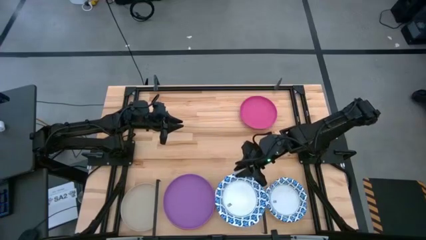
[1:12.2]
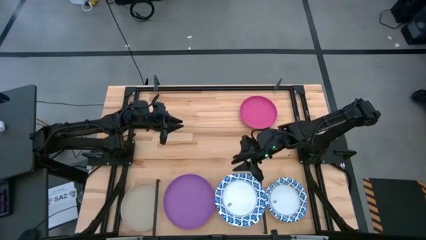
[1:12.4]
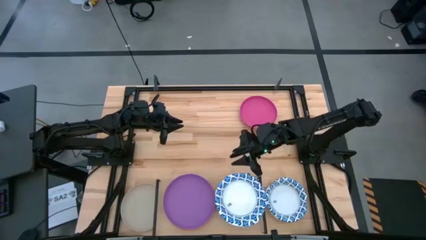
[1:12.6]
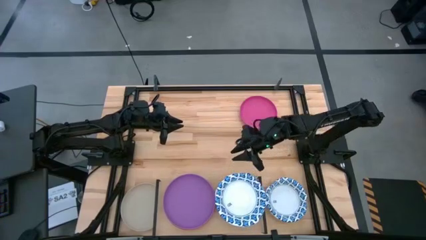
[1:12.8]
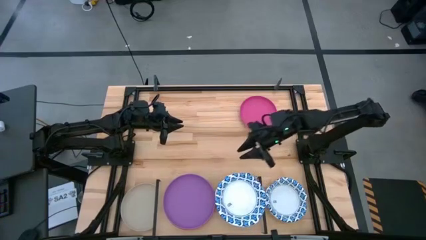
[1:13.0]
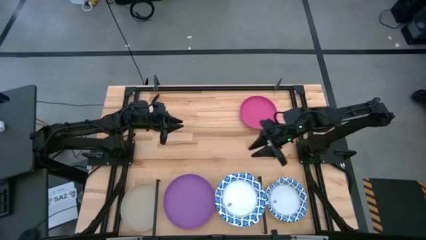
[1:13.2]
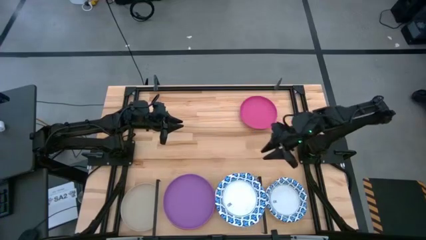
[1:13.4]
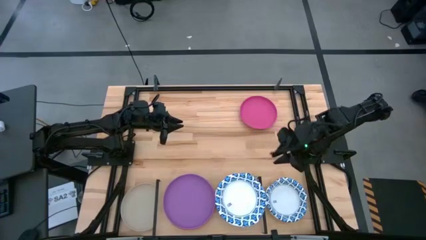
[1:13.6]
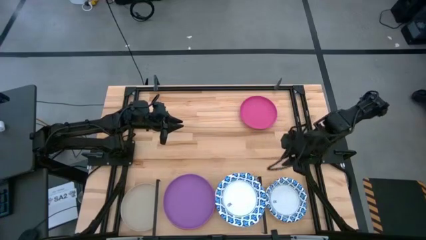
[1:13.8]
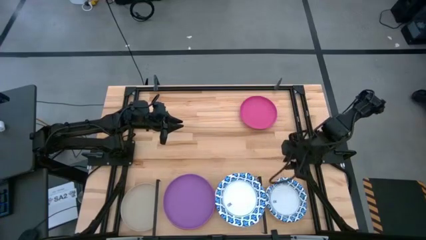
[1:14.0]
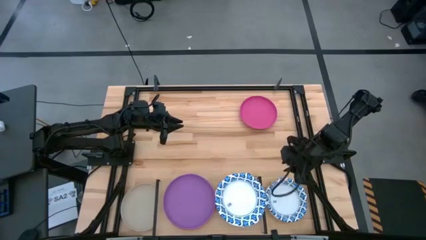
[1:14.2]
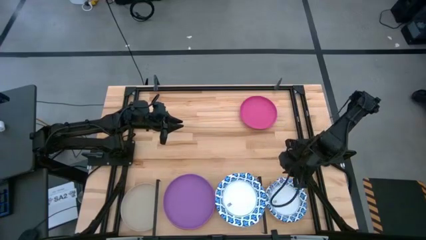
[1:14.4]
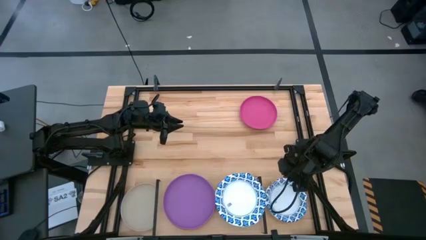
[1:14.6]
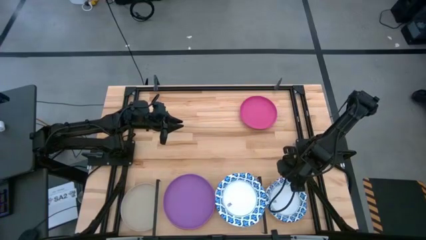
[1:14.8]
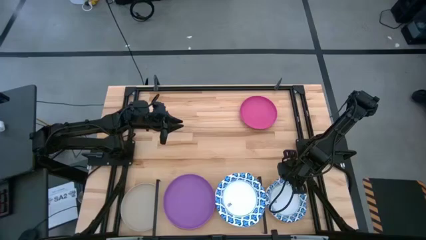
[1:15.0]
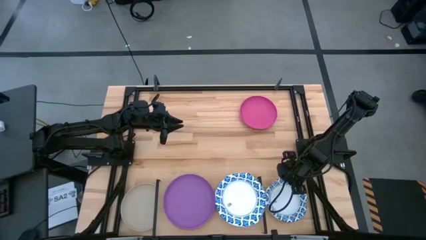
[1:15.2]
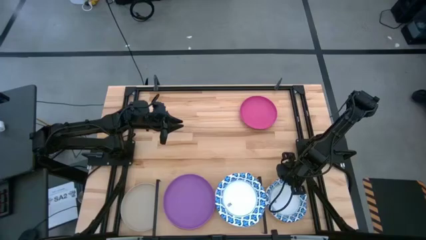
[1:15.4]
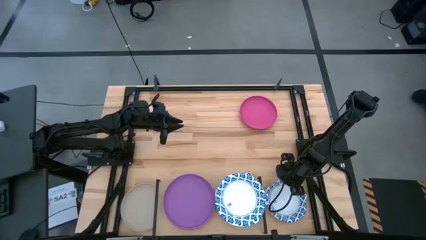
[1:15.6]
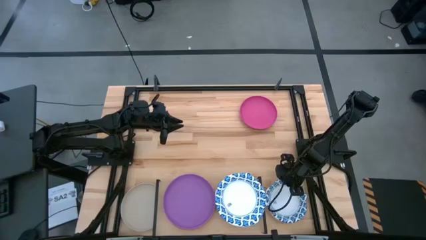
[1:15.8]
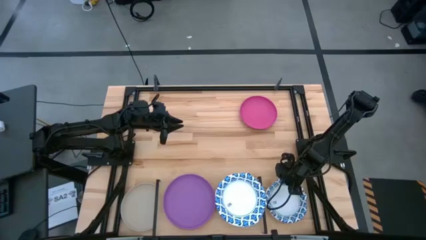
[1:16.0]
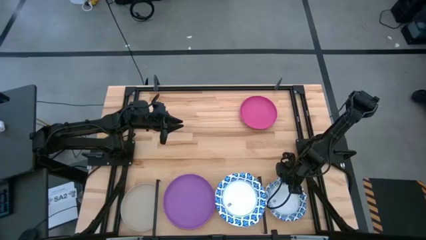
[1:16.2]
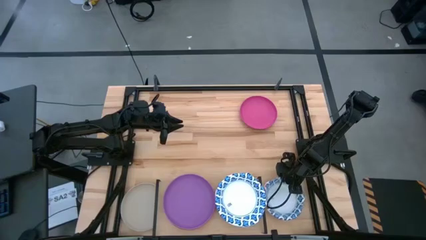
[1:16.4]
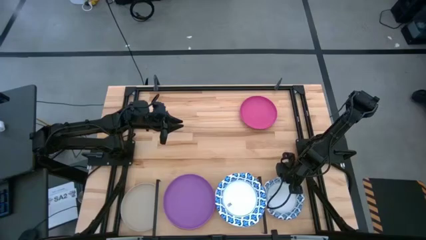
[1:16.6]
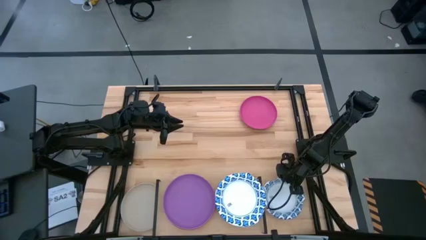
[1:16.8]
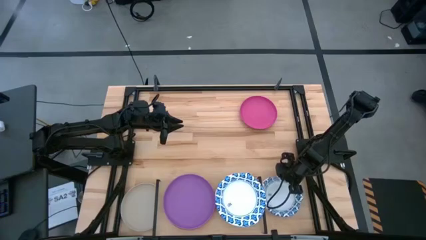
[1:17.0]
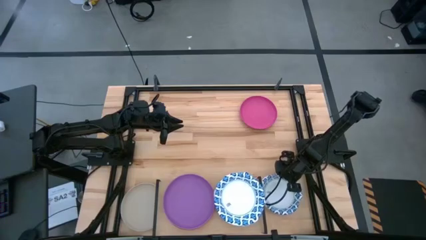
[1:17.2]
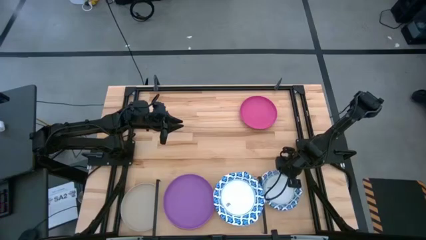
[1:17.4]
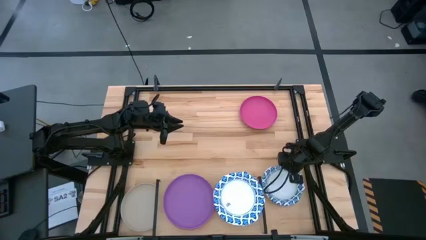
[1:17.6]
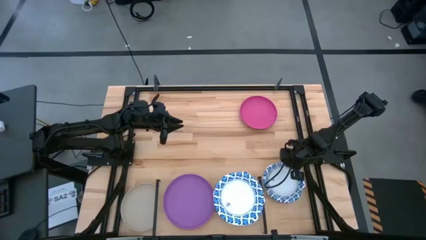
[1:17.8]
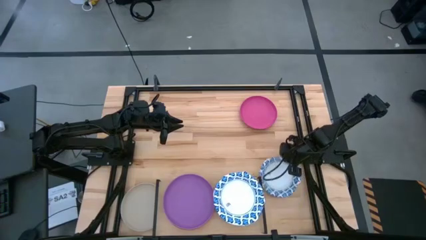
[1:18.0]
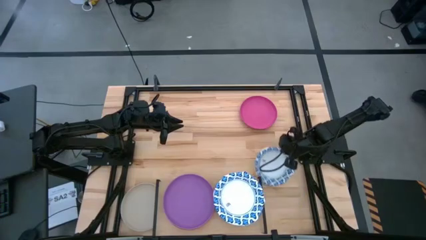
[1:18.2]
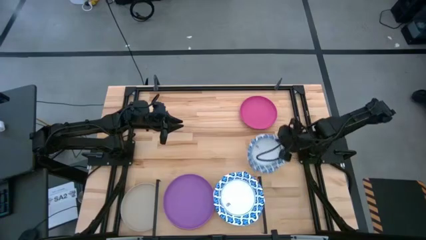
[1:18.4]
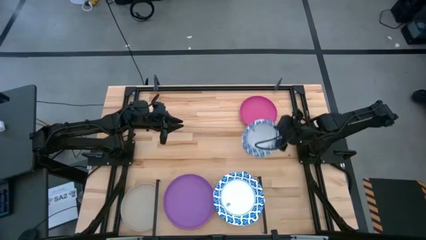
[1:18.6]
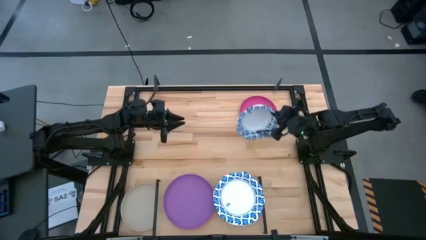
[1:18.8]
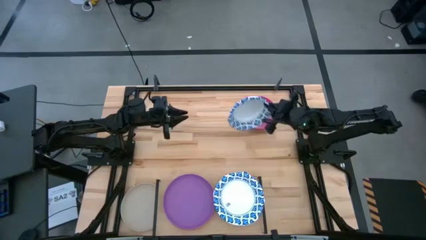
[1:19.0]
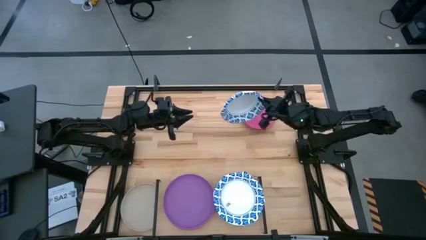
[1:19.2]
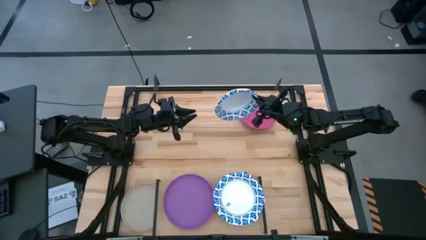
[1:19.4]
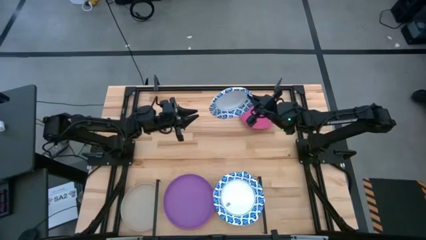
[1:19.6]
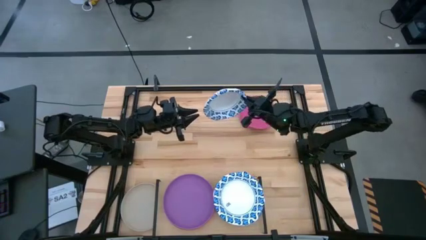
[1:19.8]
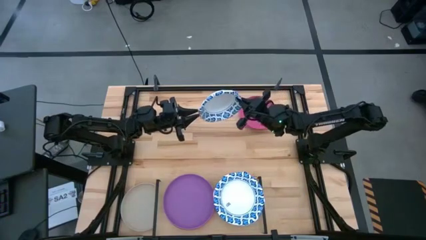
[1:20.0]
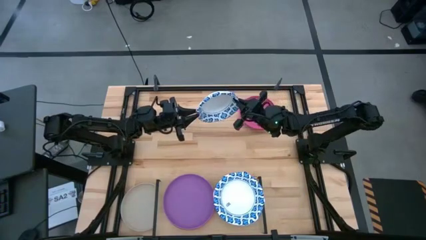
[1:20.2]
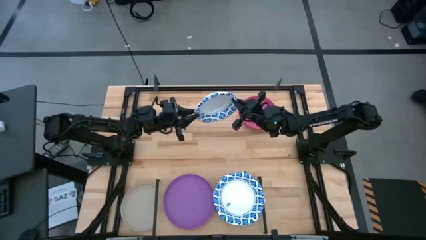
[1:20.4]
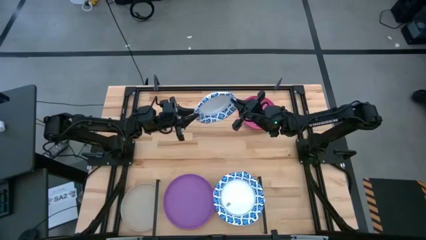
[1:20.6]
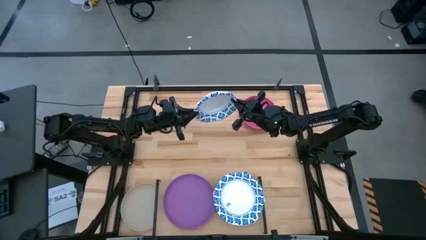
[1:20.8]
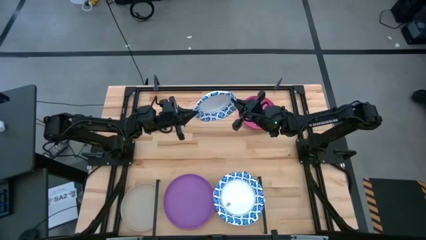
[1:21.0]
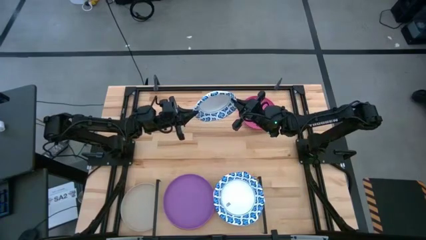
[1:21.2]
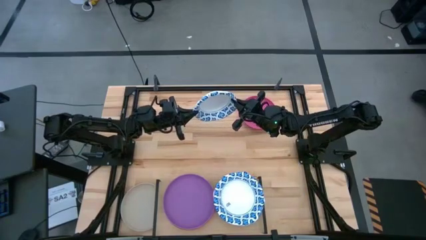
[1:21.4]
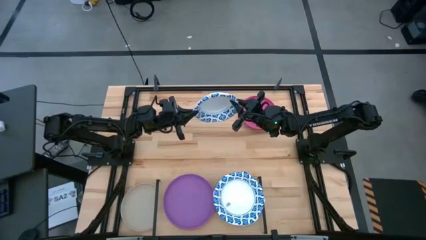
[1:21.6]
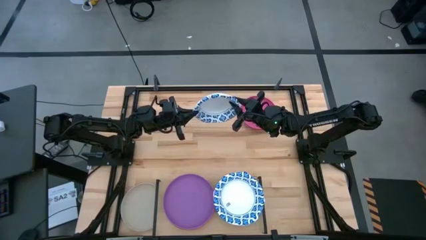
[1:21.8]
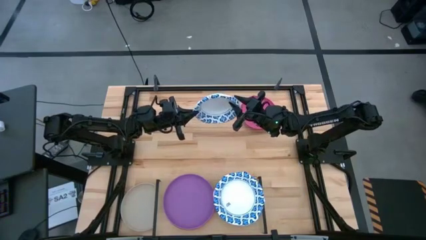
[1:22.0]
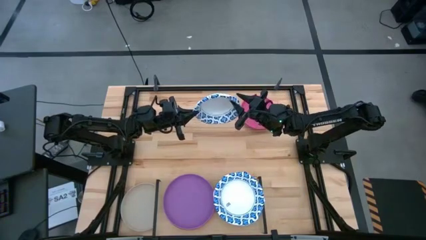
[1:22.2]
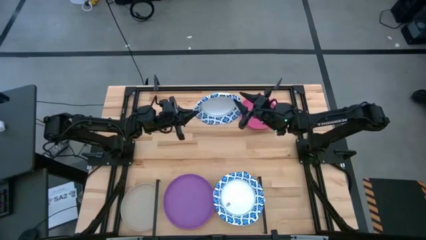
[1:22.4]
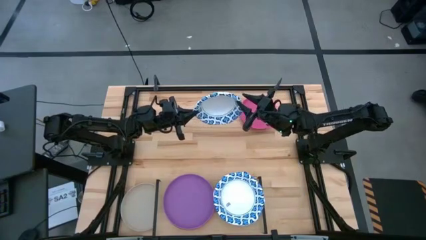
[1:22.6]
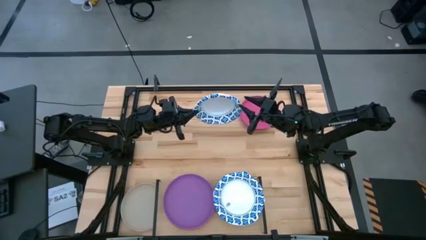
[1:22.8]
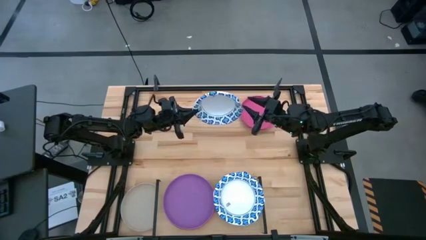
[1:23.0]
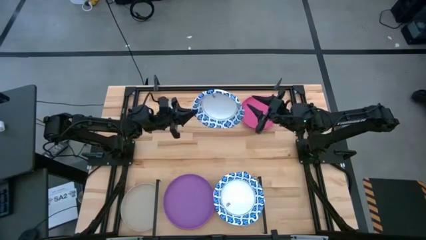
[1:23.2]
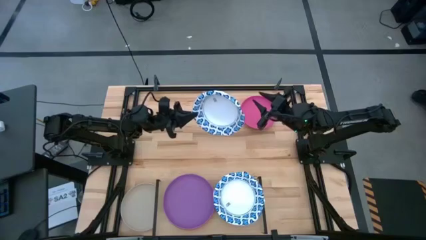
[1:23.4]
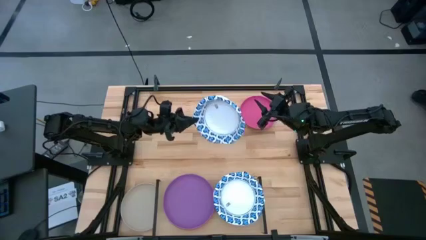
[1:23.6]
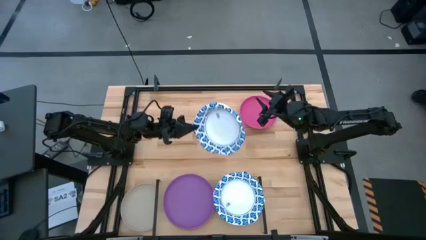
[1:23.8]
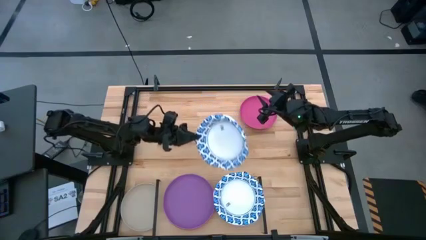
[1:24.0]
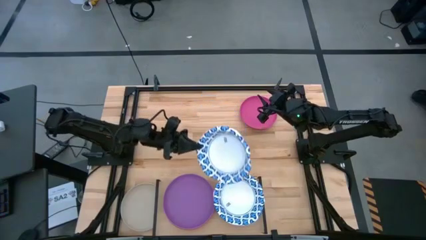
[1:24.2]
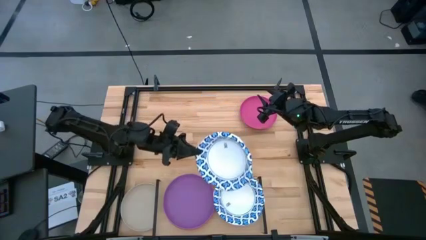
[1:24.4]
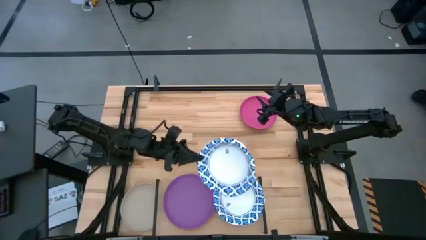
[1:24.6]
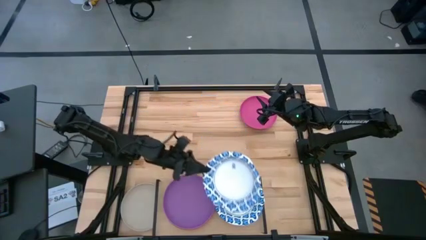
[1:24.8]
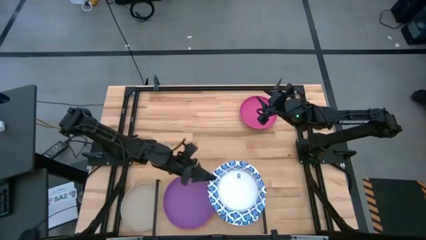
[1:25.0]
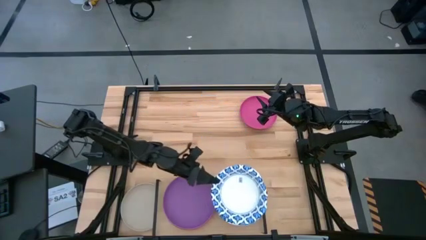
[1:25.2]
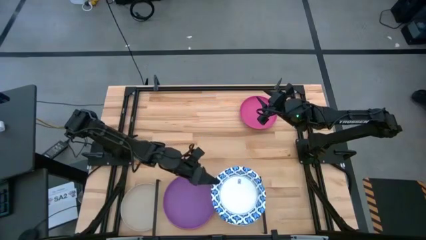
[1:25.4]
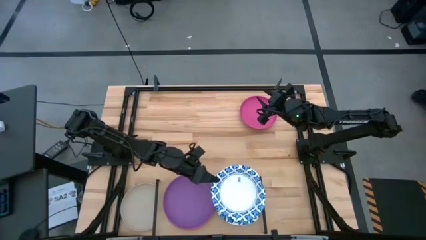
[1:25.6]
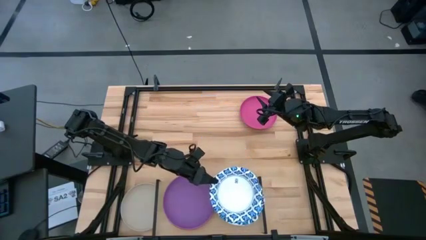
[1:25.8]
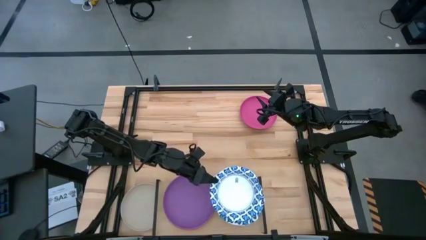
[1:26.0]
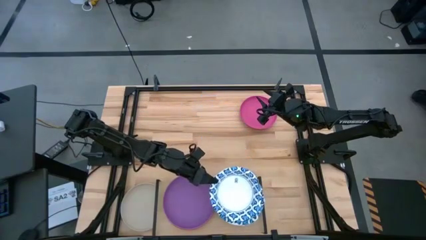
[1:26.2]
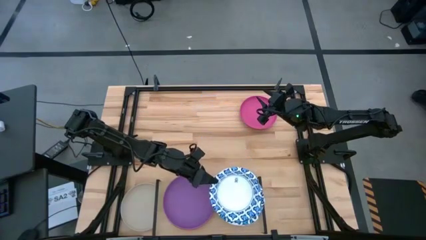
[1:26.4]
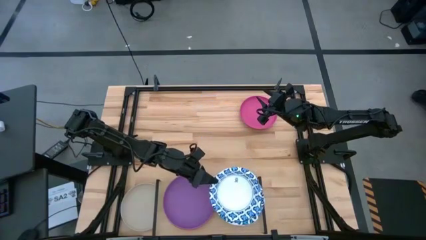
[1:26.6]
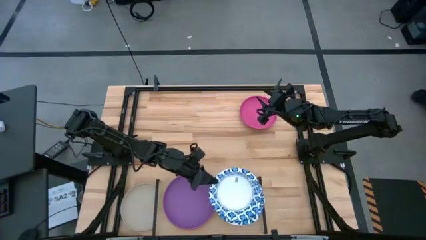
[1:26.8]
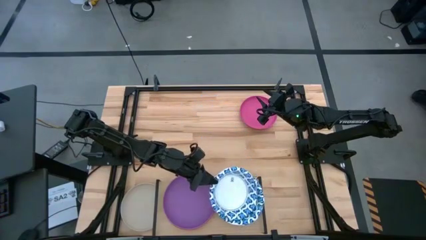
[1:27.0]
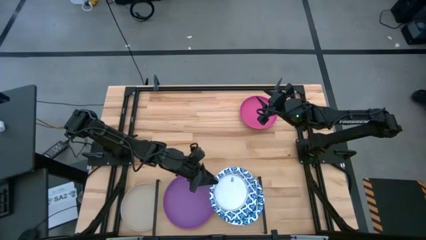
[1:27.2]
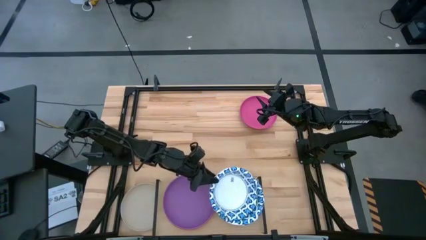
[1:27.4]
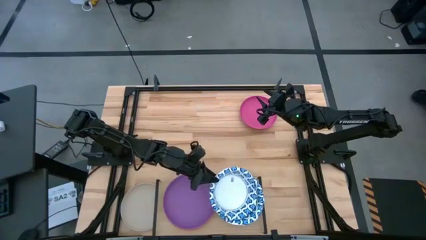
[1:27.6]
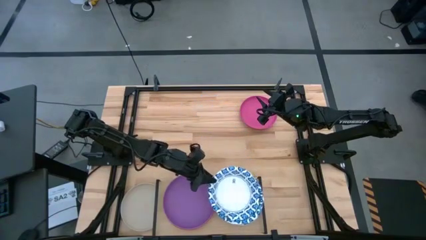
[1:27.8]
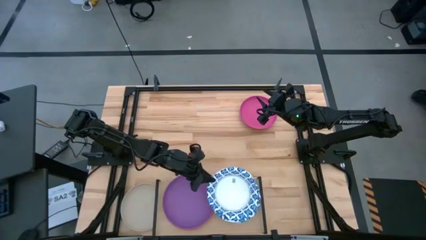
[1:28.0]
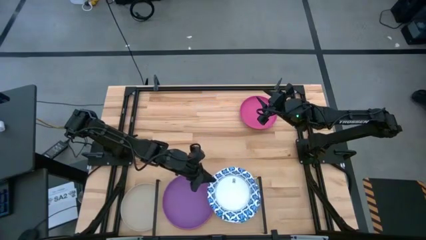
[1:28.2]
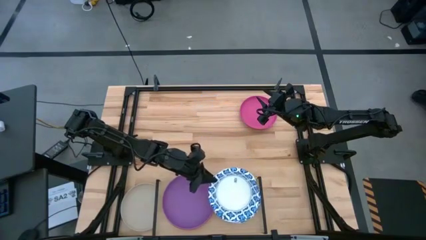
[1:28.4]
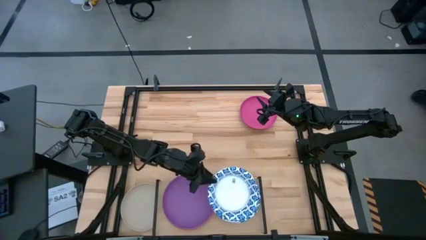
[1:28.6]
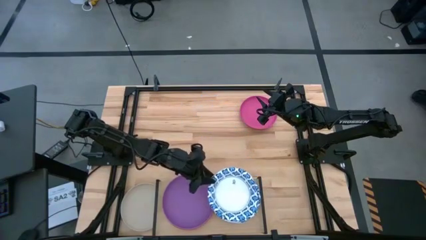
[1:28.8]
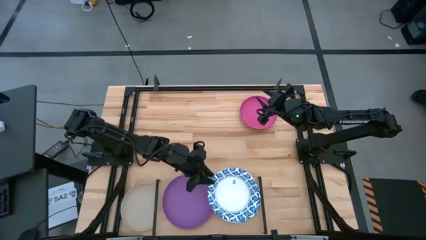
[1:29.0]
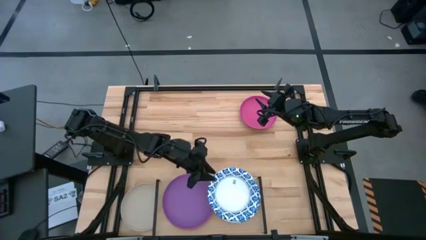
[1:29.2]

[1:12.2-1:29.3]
Task: Place and stack plates onto a shelf
Stack the white bowl on top of the white bowls on the shelf
